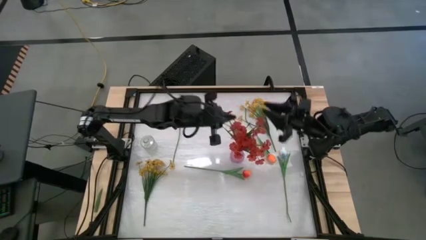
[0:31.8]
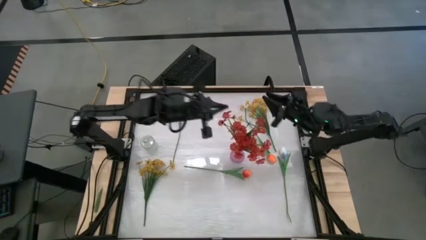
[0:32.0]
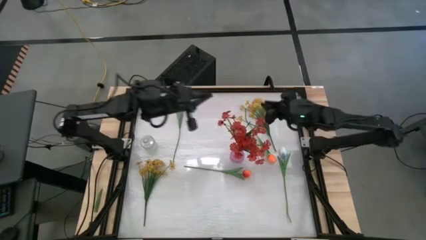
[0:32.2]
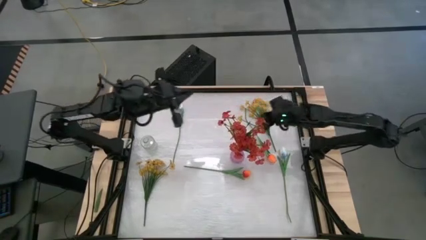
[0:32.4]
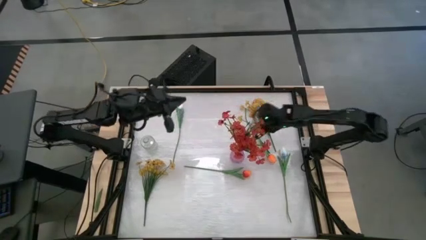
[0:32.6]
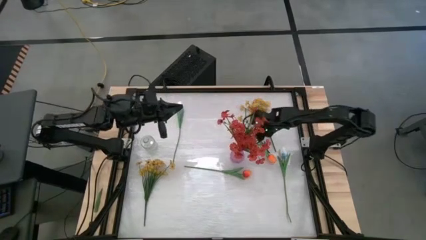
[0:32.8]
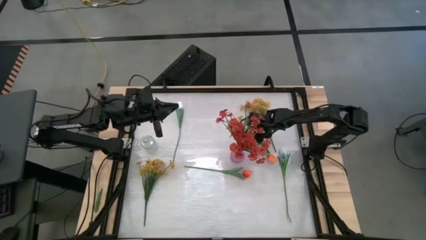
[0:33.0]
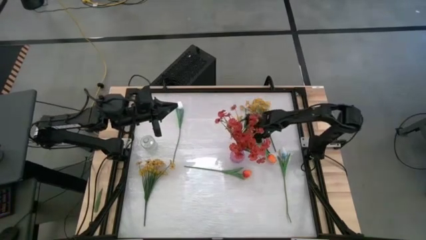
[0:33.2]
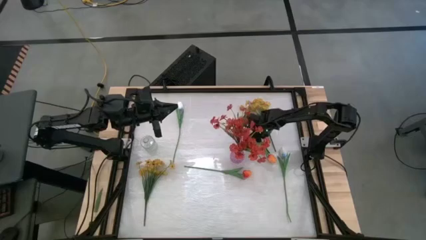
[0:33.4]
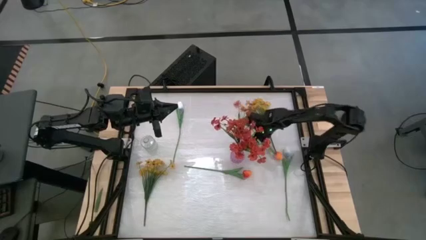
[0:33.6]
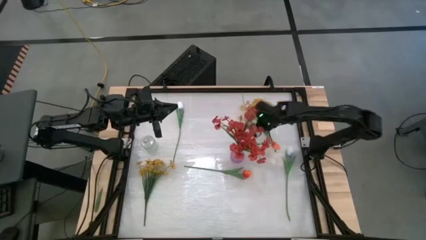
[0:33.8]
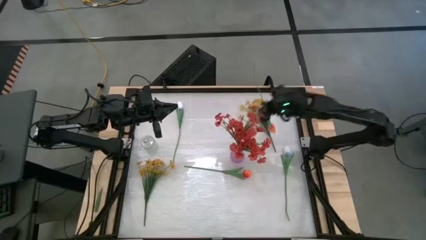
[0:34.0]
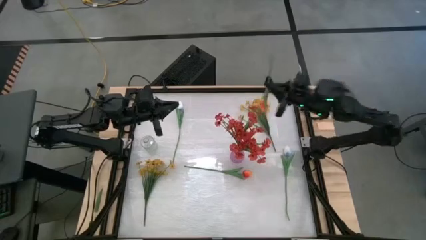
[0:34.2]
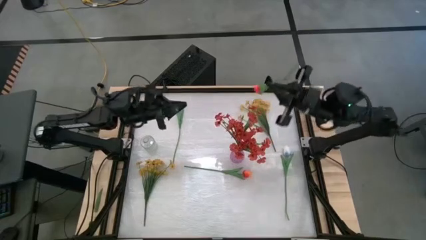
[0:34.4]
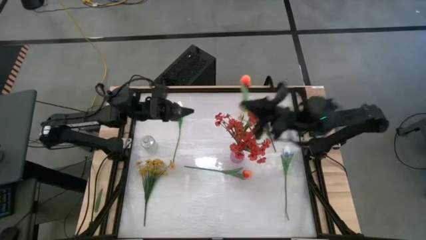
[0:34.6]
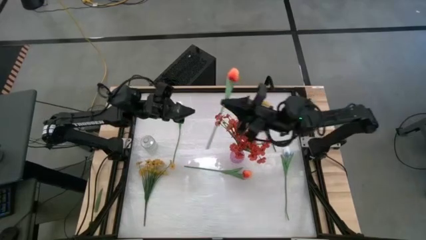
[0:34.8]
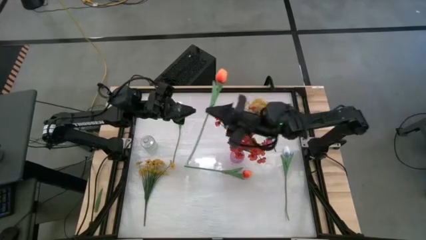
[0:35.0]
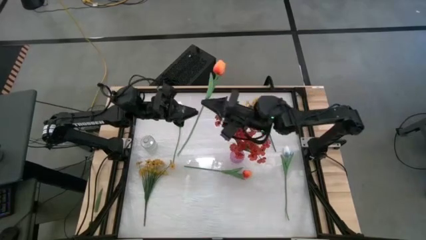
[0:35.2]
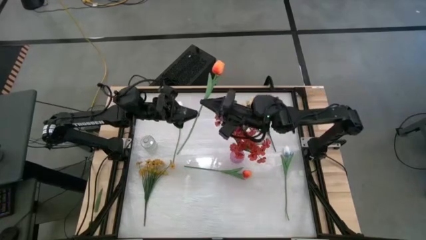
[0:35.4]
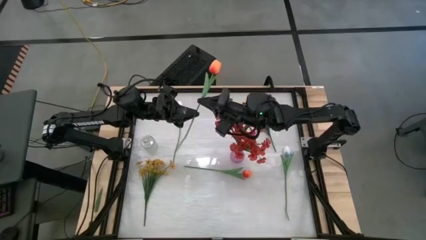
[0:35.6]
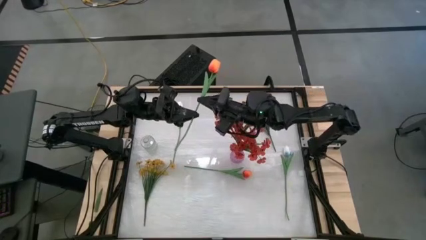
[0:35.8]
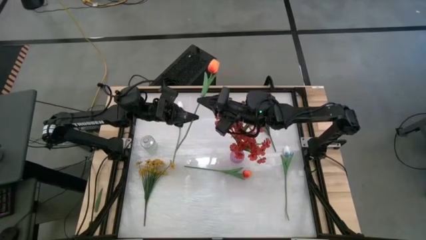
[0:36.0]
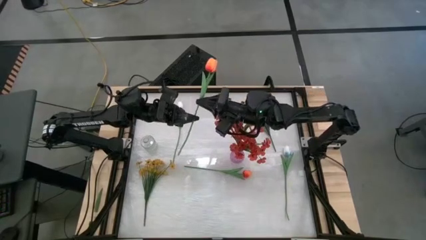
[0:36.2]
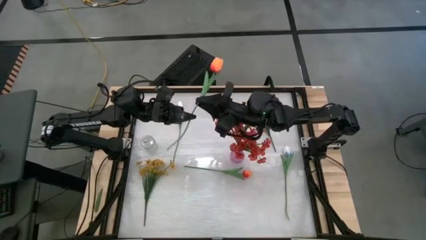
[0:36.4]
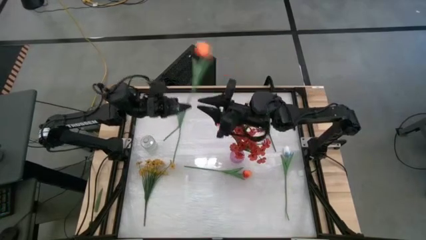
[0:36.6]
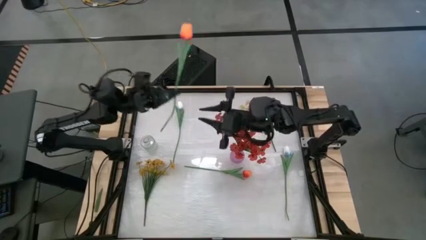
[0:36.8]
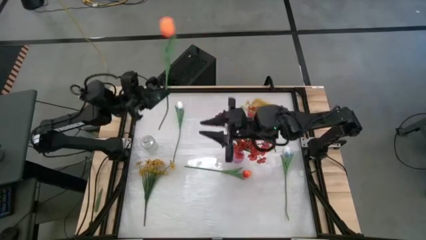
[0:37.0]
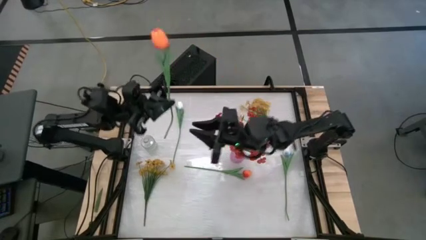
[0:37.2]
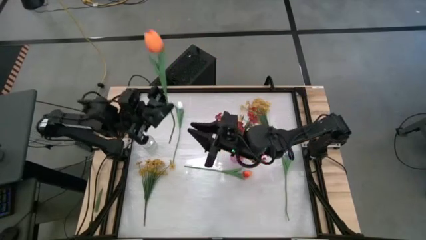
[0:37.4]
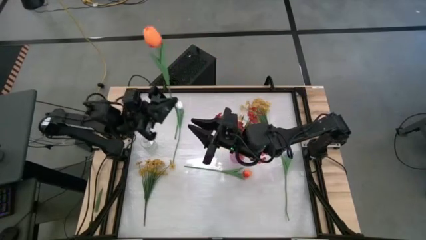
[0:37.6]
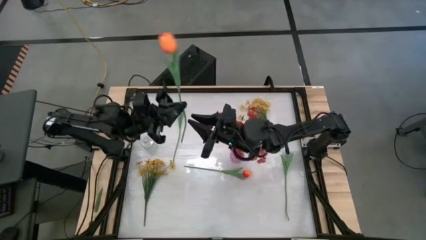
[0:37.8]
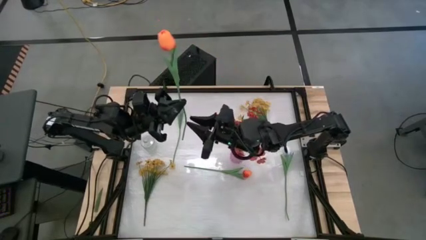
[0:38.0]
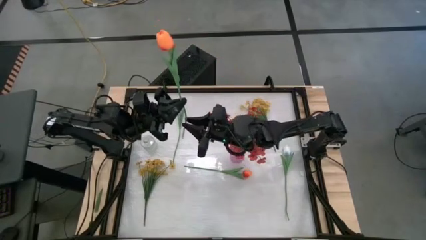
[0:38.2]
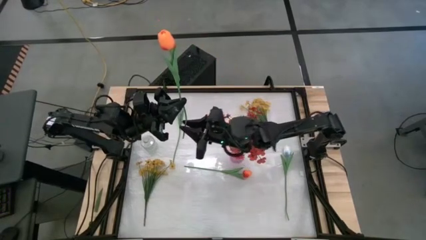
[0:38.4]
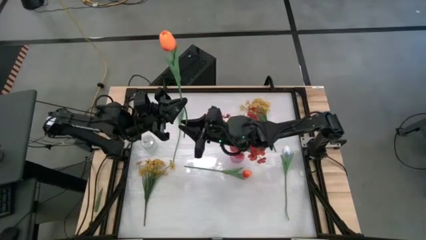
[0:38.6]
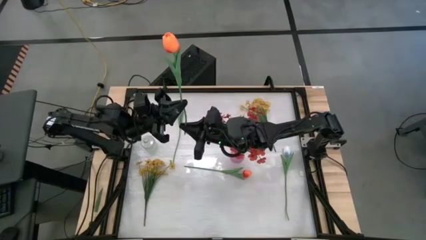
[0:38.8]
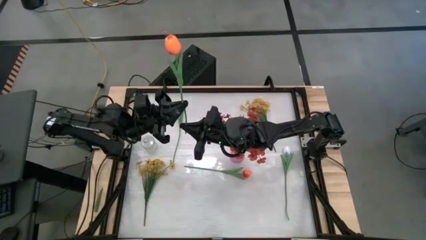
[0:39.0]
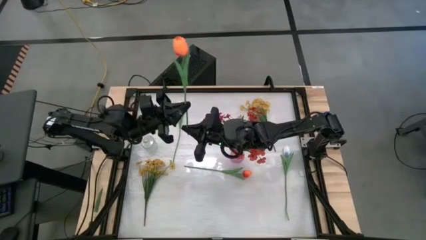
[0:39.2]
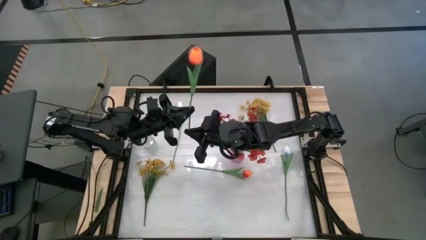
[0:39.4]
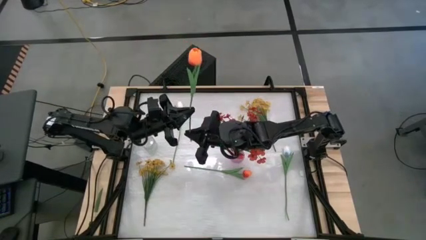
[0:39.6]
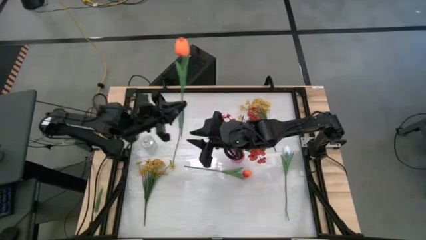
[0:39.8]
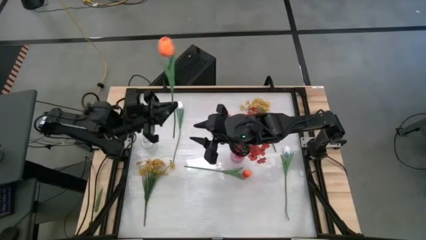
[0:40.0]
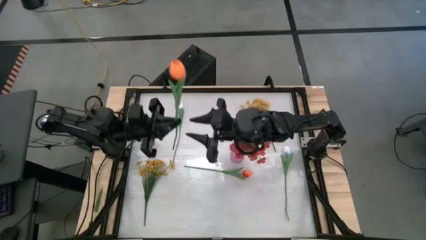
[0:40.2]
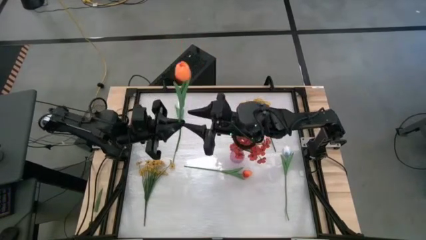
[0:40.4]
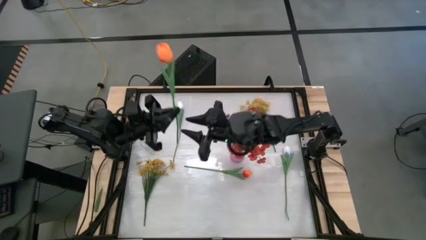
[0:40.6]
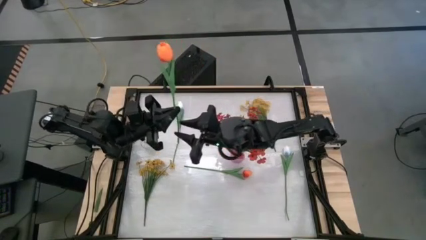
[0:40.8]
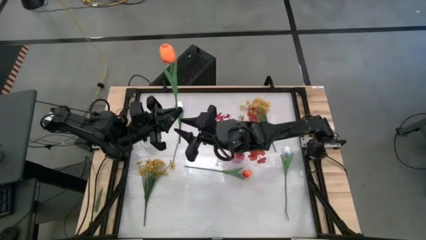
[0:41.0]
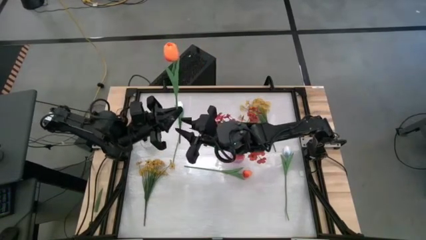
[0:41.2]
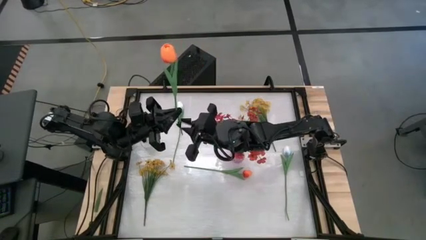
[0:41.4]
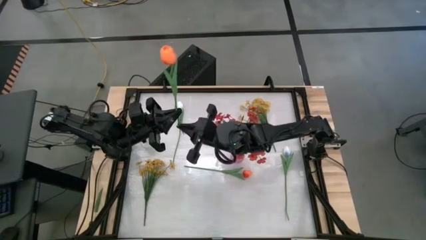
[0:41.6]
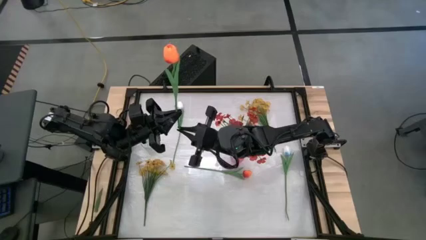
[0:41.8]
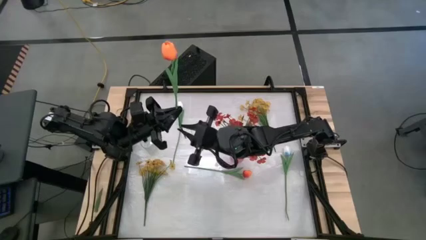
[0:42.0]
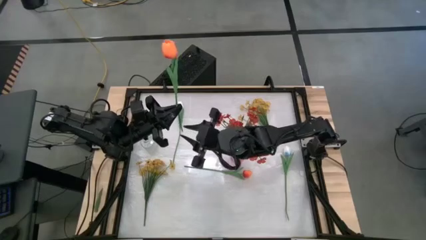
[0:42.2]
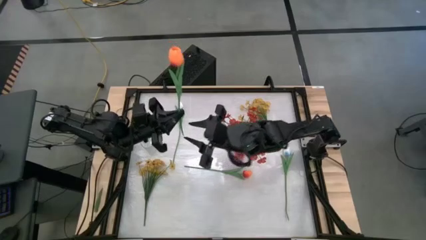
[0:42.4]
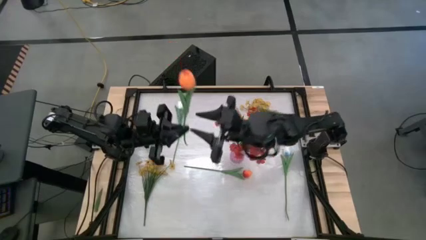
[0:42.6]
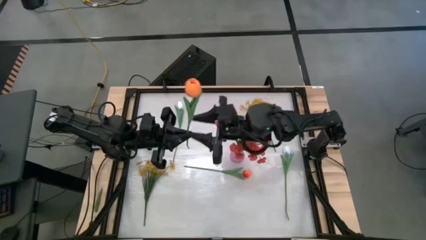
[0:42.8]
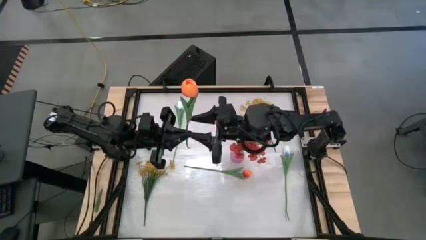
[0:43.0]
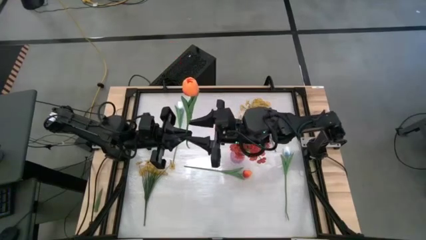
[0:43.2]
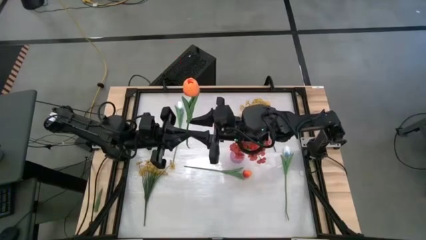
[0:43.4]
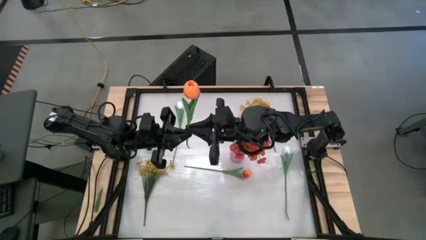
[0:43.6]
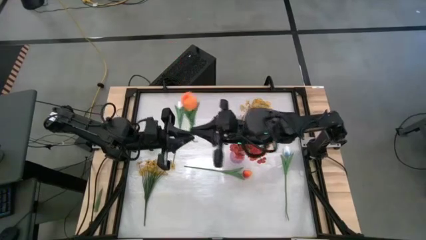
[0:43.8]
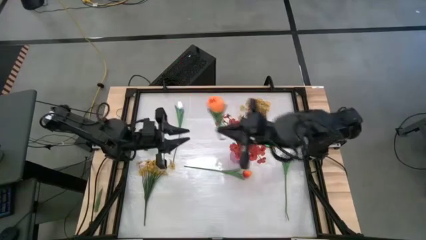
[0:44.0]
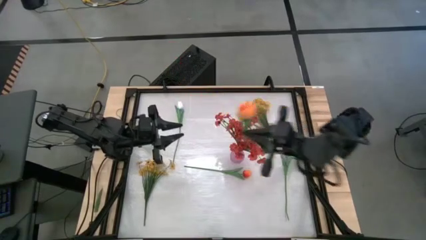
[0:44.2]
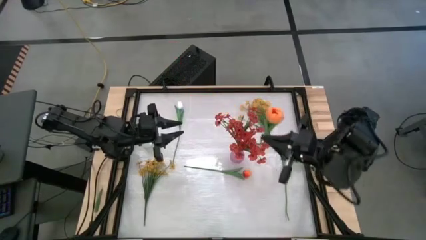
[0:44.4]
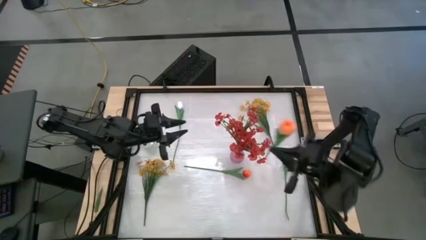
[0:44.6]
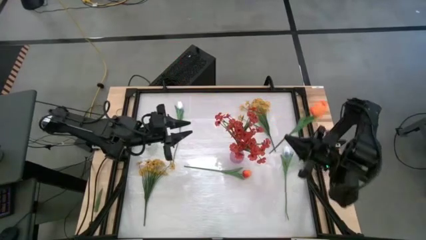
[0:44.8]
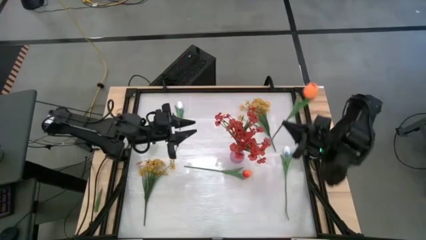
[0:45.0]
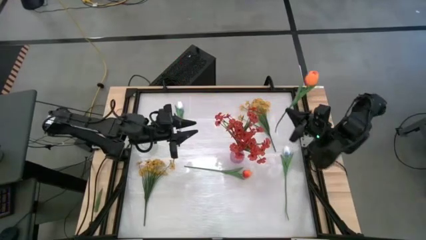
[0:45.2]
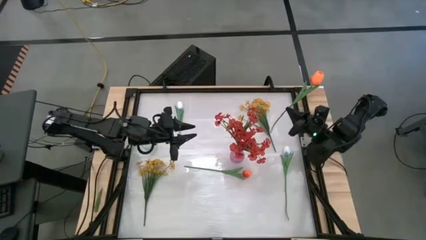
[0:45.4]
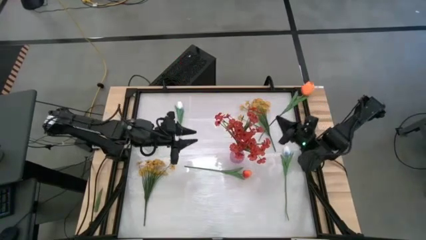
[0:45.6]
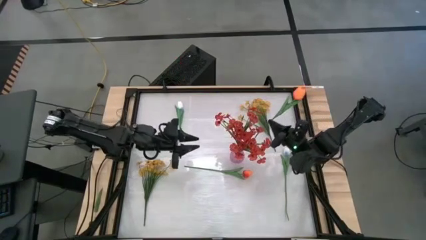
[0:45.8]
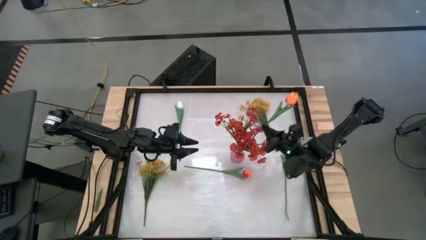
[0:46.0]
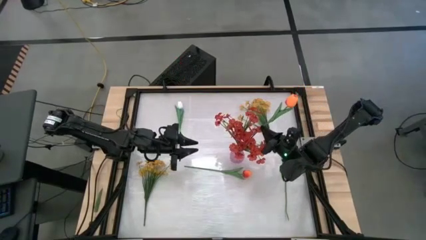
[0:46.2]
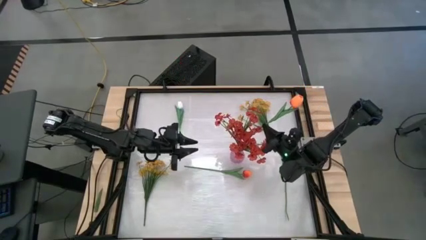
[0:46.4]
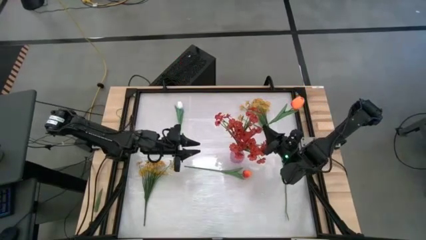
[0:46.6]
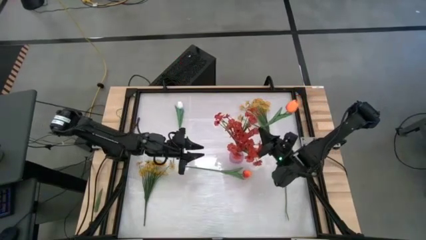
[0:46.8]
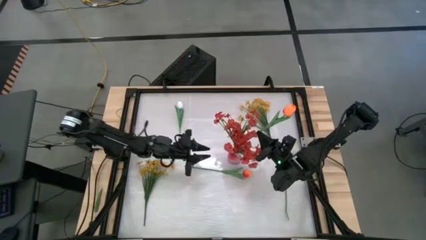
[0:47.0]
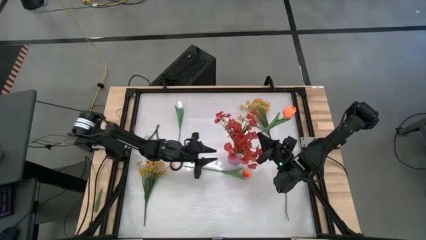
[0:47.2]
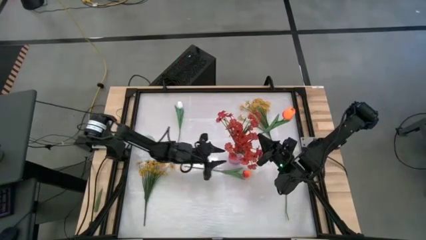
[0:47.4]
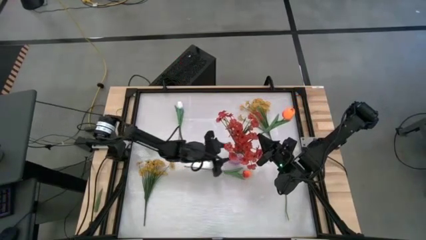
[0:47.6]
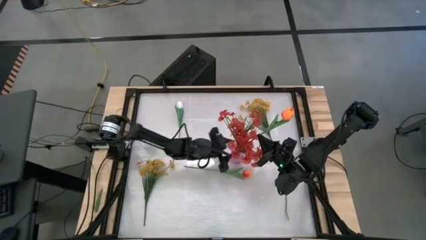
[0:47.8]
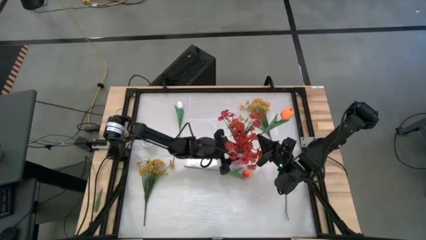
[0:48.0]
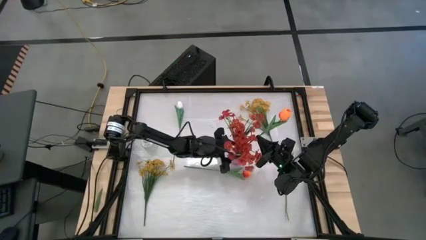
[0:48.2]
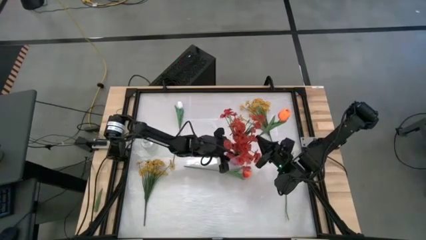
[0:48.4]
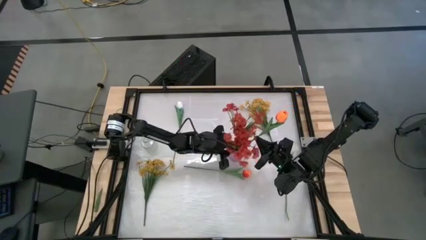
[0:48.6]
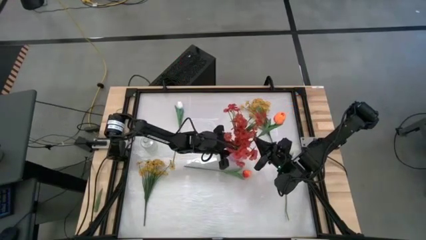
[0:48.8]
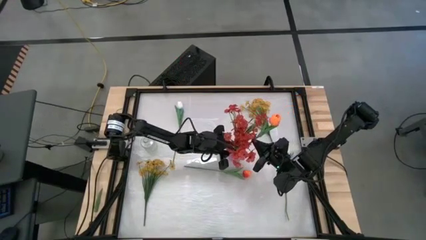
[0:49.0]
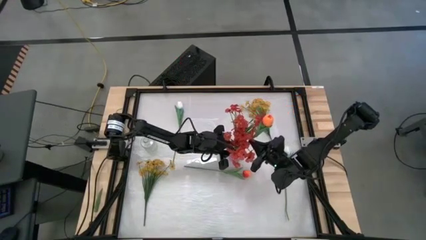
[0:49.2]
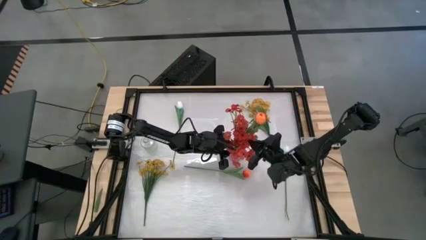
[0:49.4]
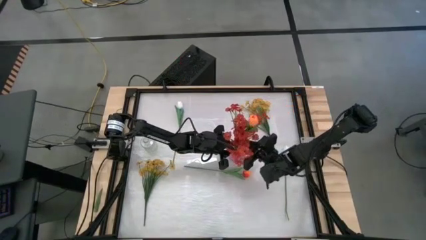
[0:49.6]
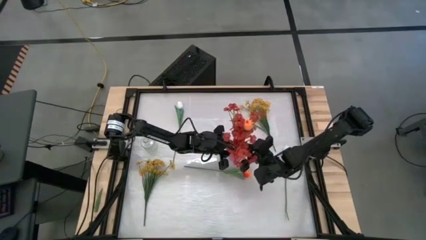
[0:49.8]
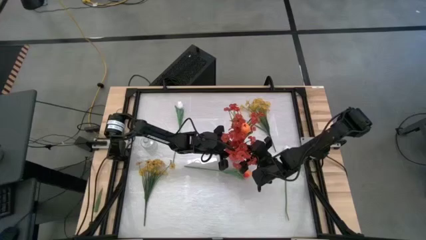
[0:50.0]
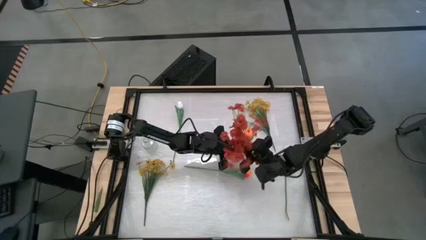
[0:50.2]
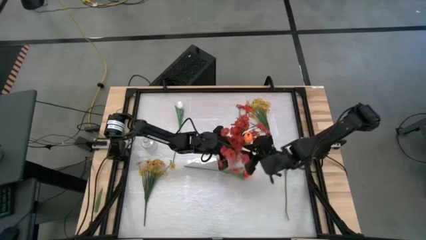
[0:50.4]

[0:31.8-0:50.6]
Task: Sort flowers into vase by color
Put the top orange flower into the violet vase
